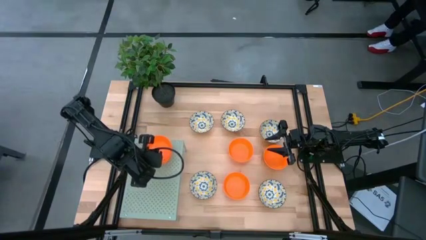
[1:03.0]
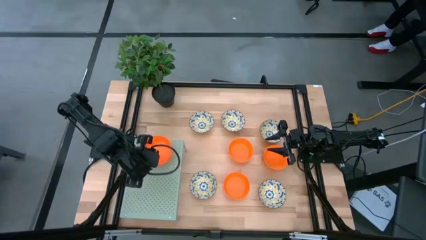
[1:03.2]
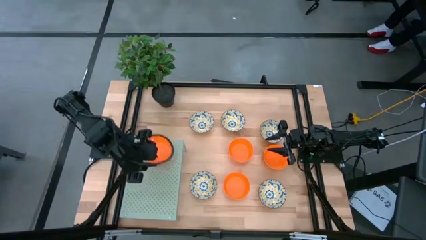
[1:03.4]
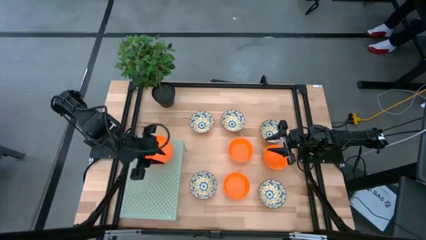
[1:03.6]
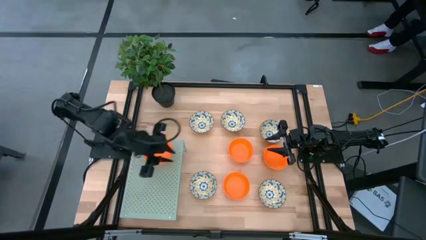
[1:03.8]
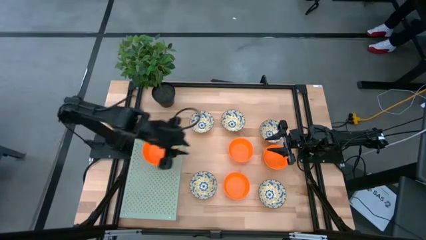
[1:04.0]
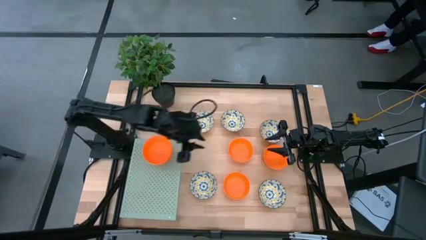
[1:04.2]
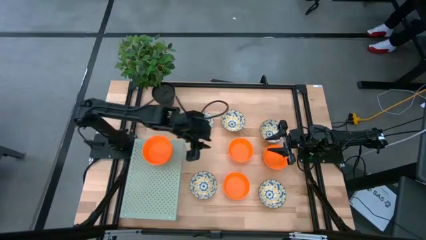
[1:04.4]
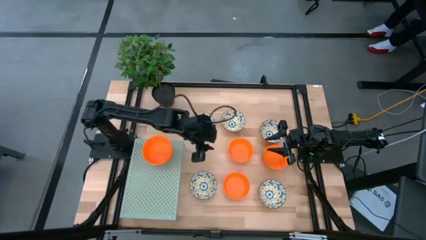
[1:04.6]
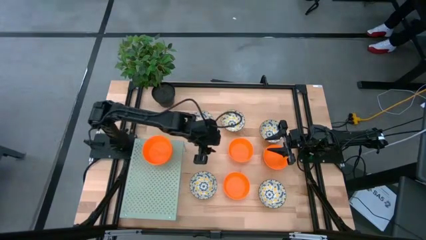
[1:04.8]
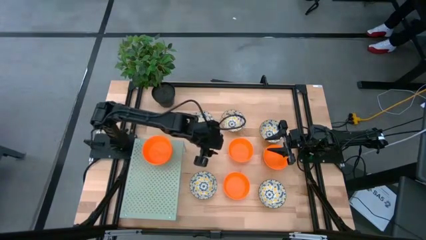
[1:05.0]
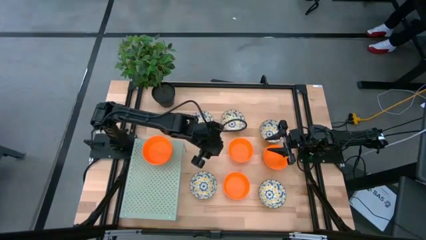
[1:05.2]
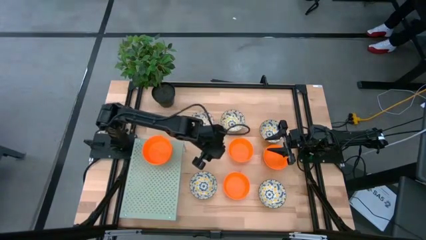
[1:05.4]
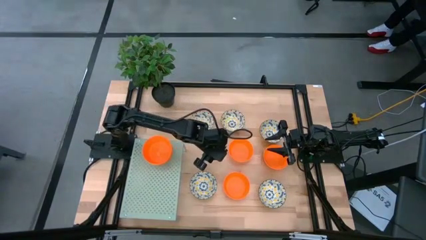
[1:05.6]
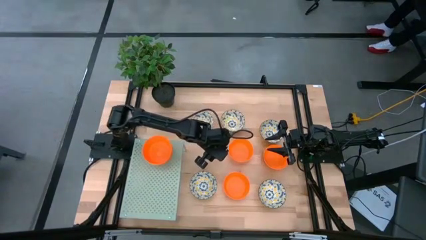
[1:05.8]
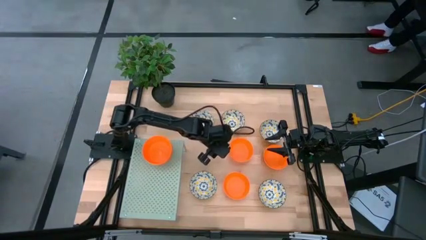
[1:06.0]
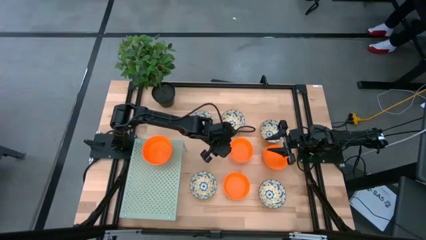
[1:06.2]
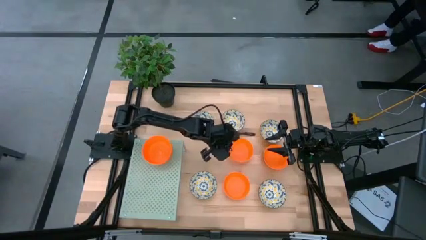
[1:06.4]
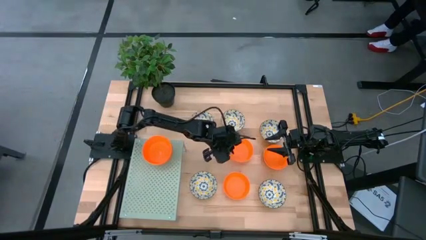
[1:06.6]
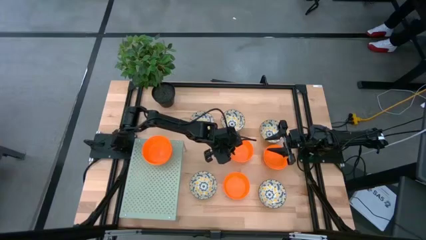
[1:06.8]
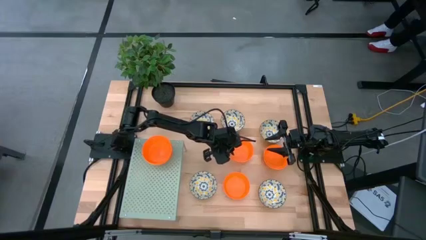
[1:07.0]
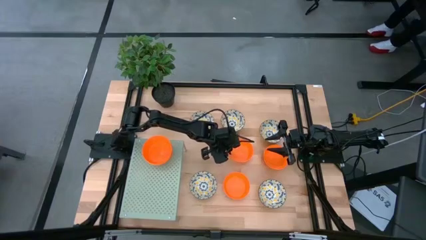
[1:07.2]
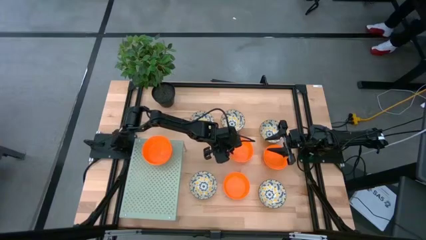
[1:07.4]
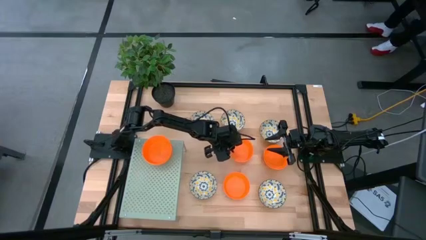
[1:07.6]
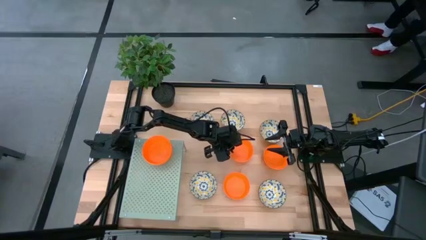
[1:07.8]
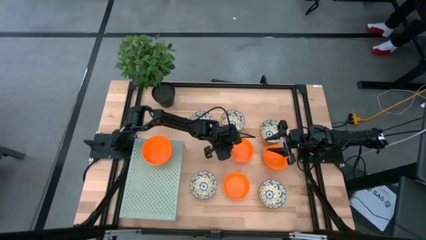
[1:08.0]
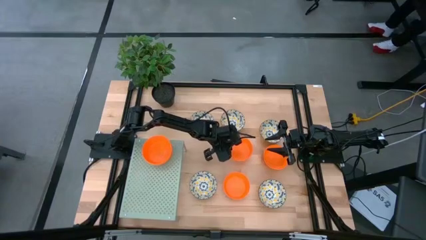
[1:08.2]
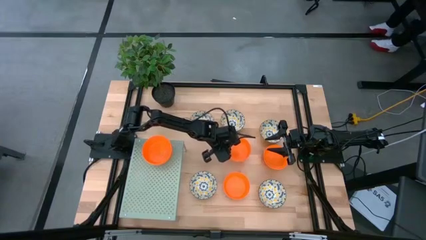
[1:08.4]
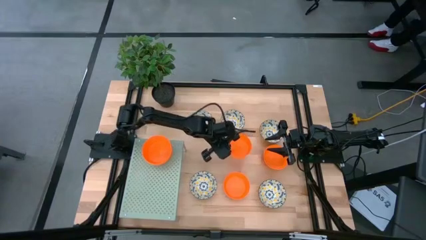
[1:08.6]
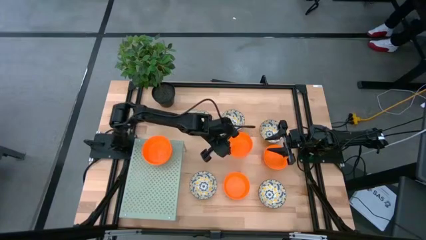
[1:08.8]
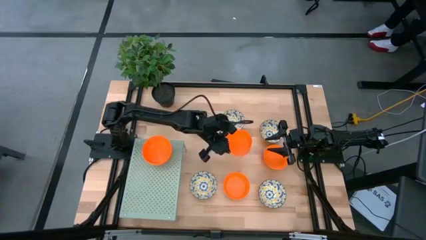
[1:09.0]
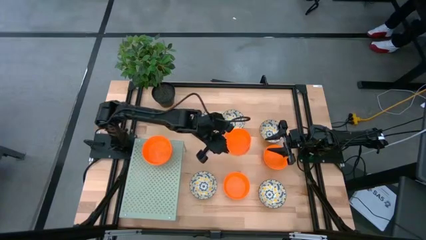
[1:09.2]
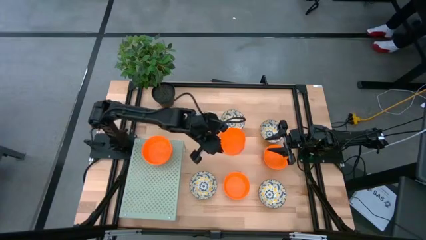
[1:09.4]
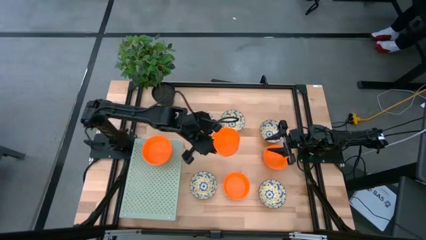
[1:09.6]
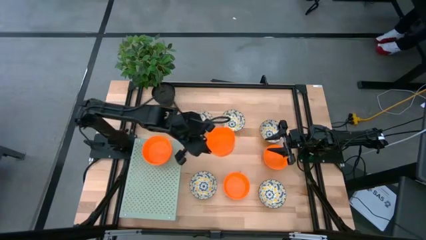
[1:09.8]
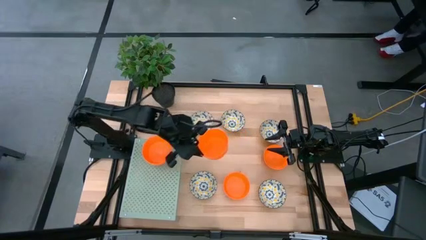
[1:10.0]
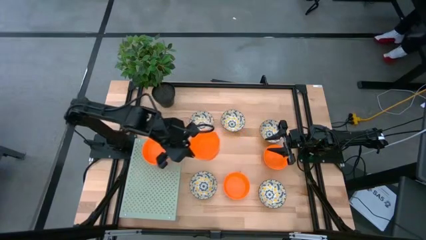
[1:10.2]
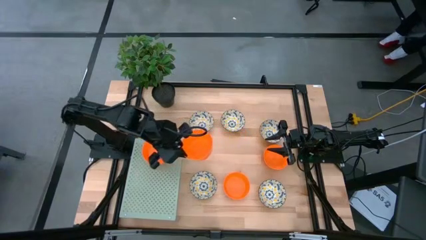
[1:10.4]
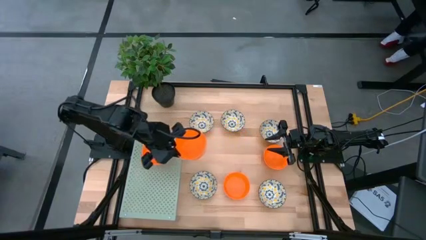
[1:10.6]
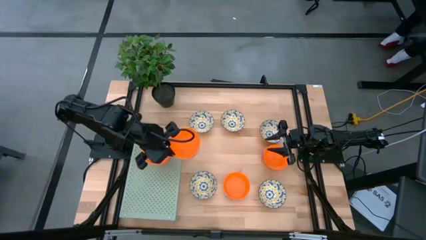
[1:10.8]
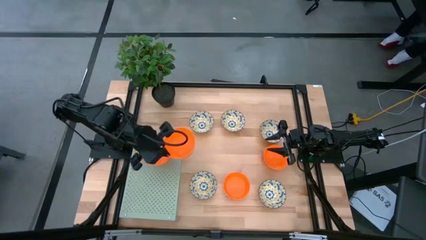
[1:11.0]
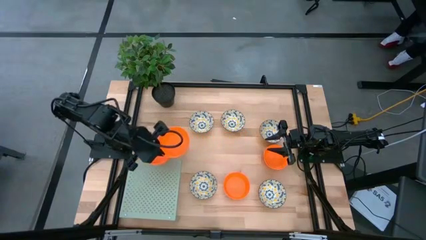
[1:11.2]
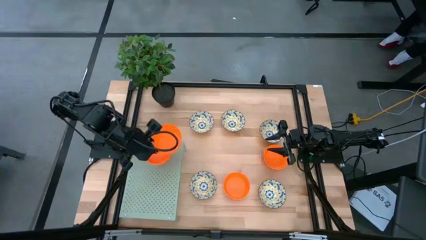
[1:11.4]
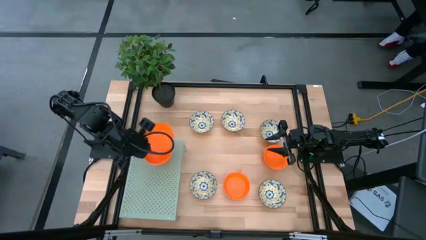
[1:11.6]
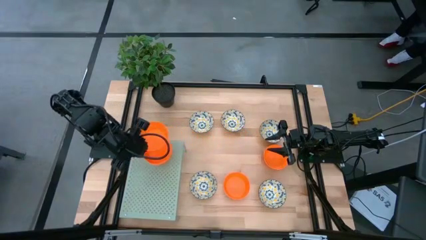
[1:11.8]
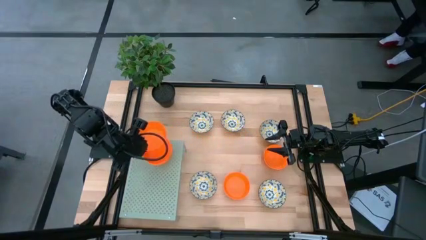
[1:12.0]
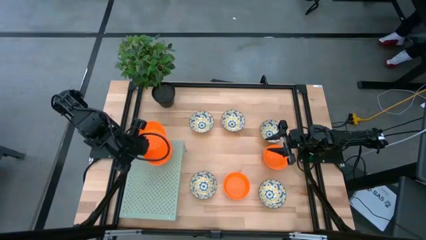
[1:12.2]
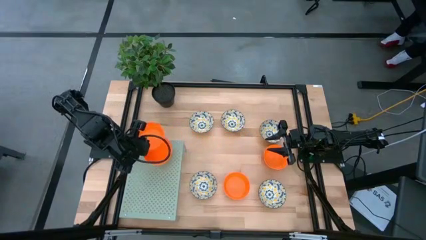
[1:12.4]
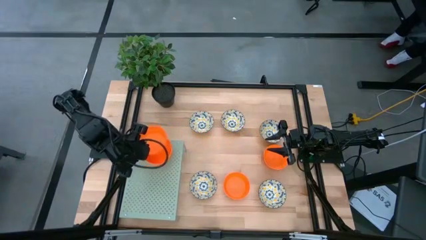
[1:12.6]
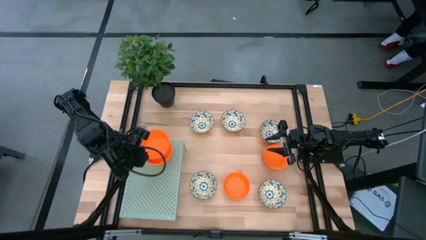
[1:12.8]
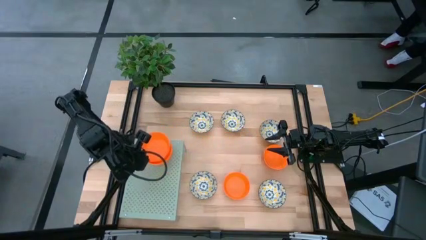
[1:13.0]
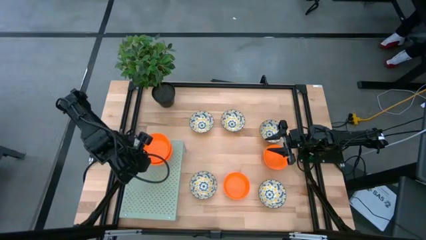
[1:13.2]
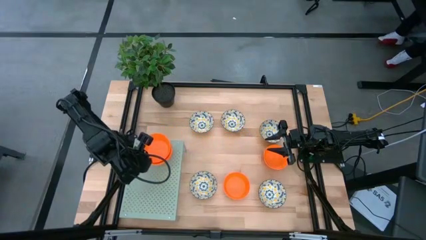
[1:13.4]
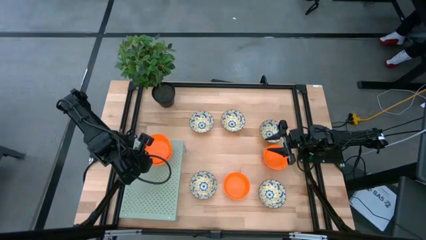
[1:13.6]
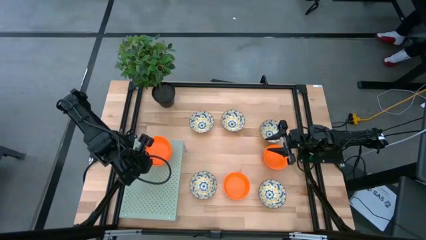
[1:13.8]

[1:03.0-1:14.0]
Task: Pick & Place Mini bowls
Stack the orange bowl on top of the orange bowl on the shelf

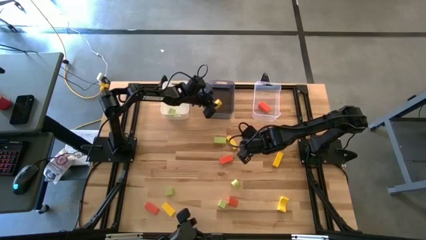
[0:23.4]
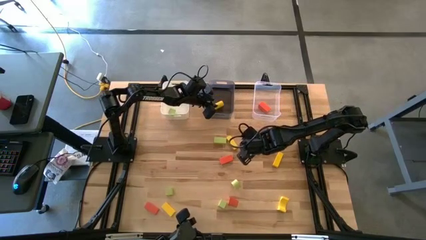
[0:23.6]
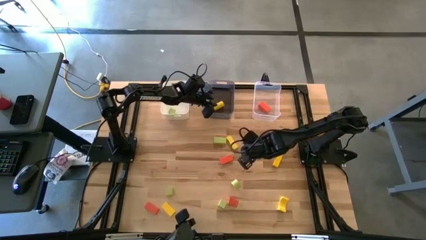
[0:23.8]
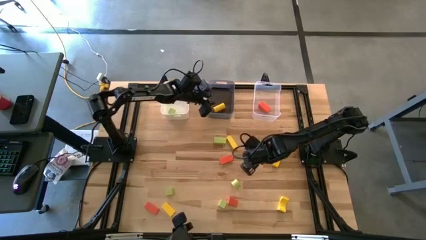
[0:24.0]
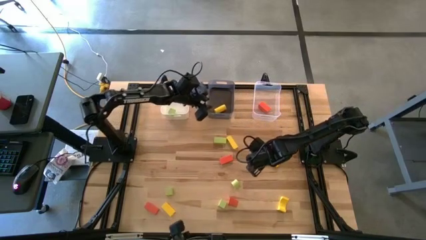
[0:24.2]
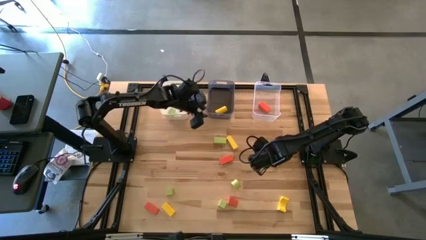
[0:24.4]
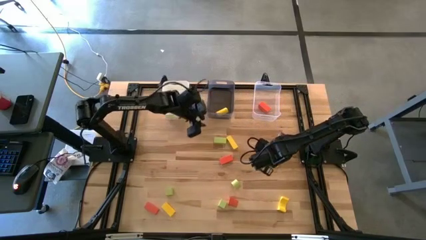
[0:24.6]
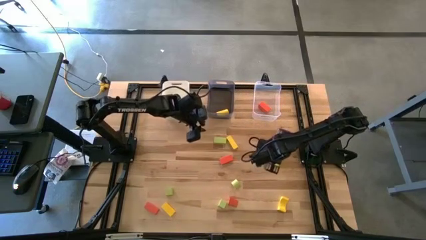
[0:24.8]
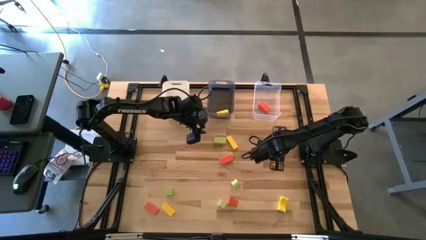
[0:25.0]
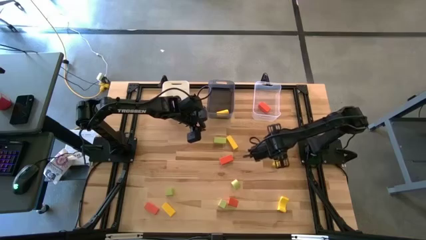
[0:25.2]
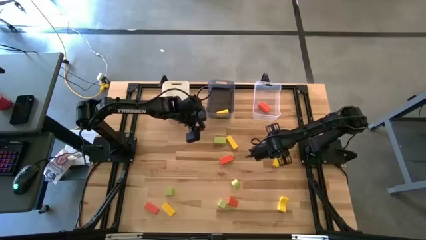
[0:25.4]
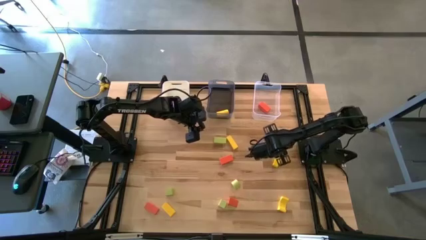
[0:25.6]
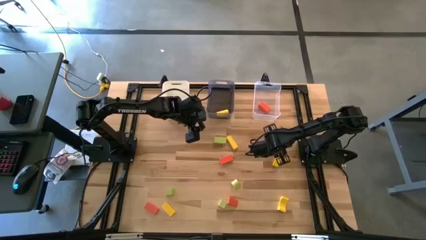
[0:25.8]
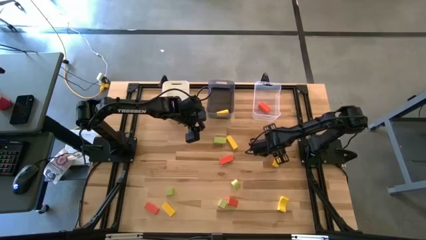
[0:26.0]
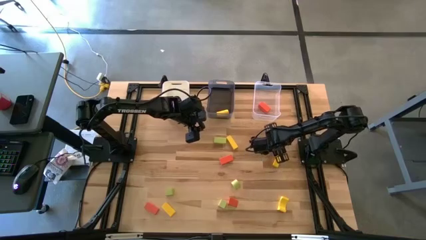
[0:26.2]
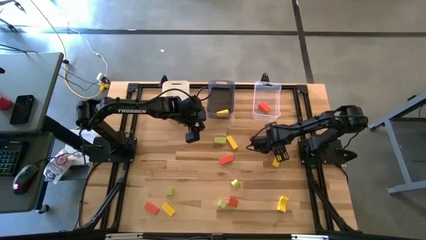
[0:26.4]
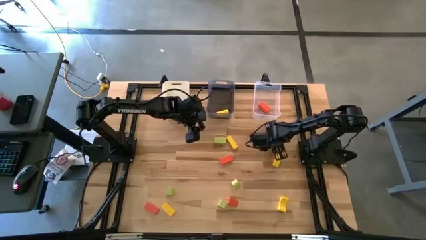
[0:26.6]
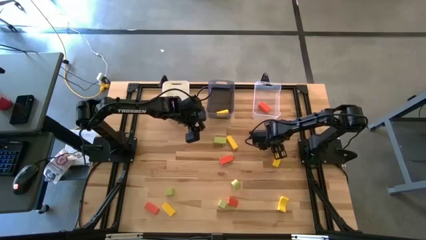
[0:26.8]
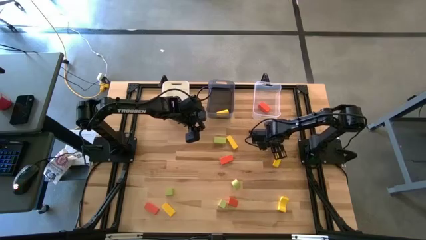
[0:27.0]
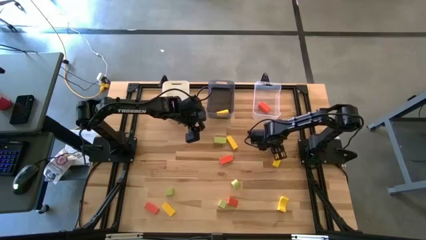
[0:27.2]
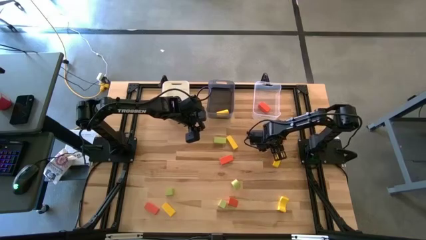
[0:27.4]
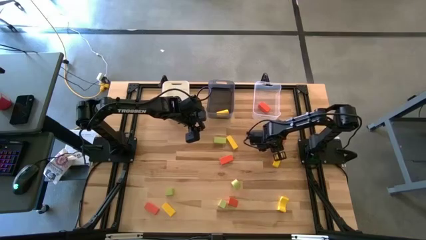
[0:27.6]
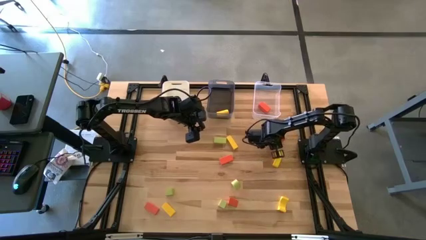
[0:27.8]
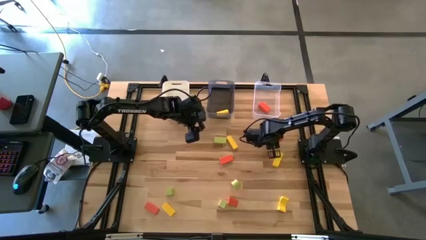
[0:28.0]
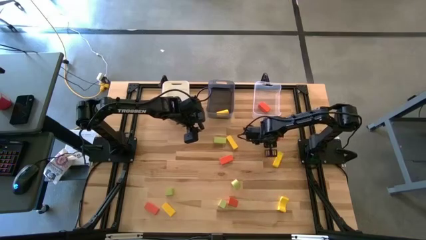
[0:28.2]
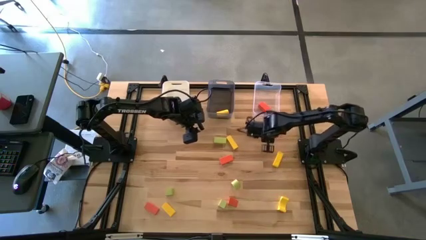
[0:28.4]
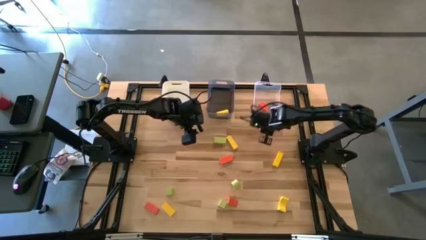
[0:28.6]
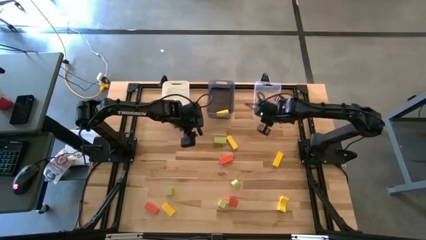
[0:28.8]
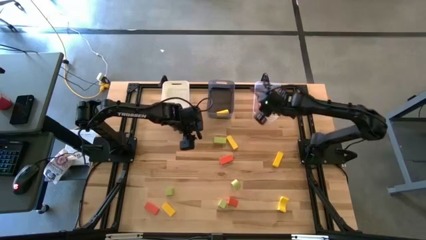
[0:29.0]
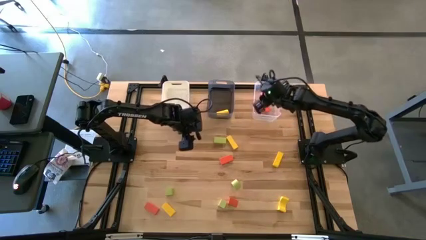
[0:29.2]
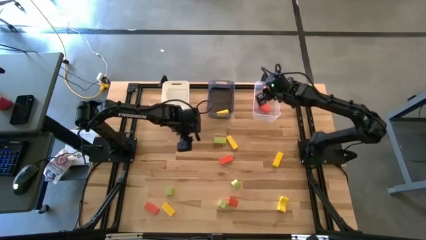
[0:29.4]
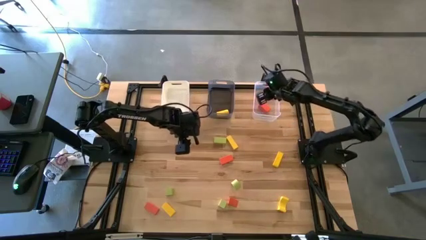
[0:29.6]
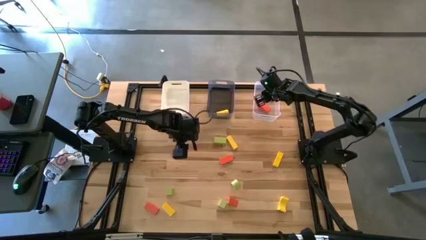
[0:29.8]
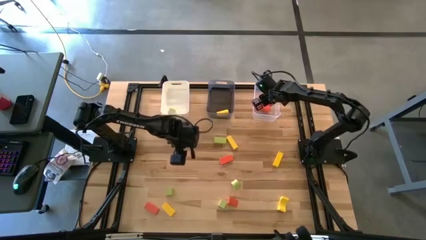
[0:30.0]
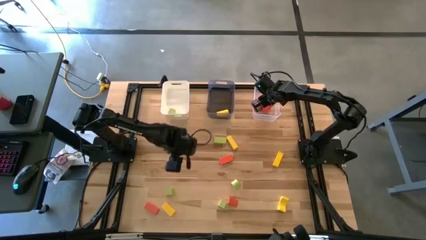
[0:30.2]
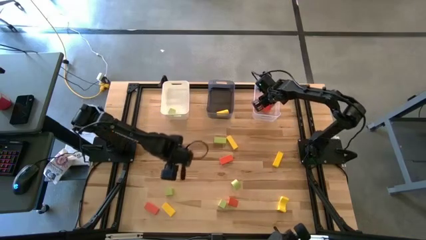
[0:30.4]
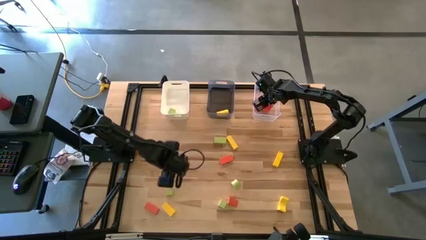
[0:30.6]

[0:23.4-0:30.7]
Task: Sort & place blocks by color
Put the orange block into the transparent bin
